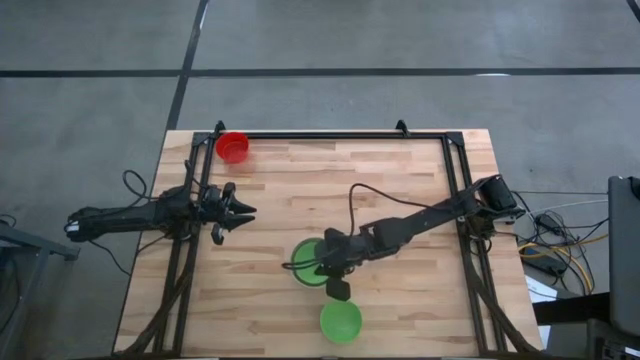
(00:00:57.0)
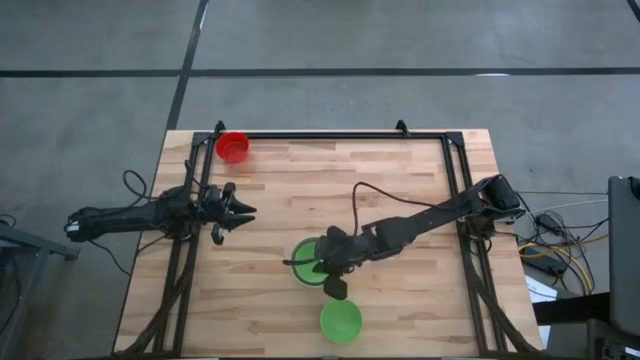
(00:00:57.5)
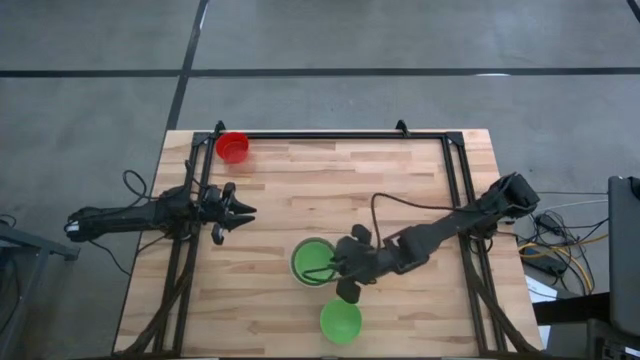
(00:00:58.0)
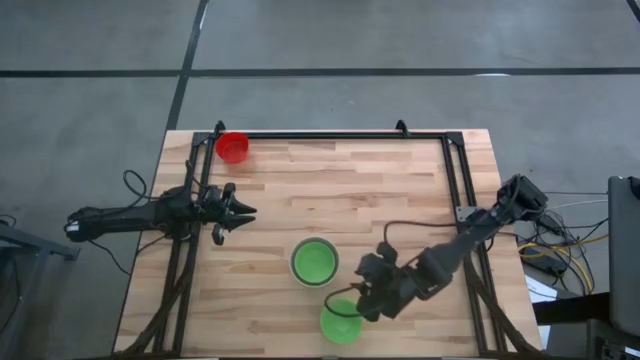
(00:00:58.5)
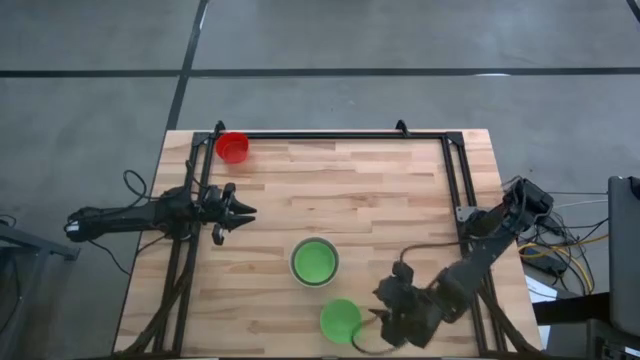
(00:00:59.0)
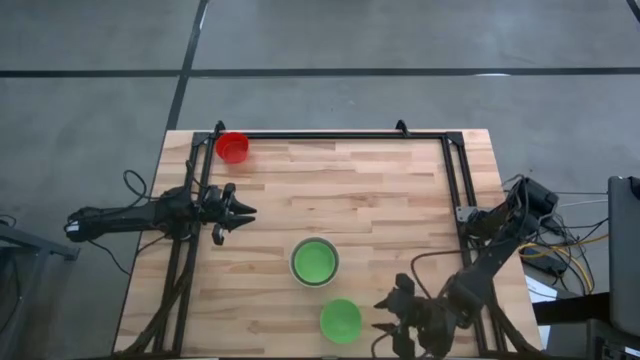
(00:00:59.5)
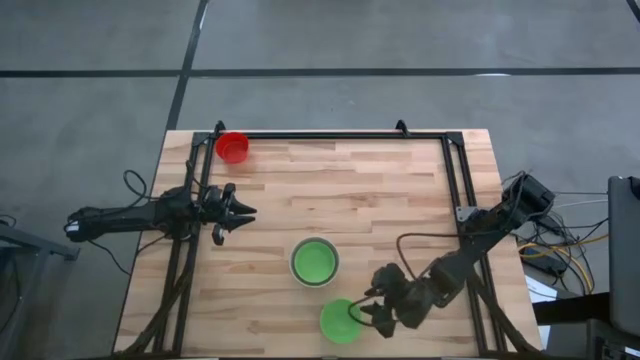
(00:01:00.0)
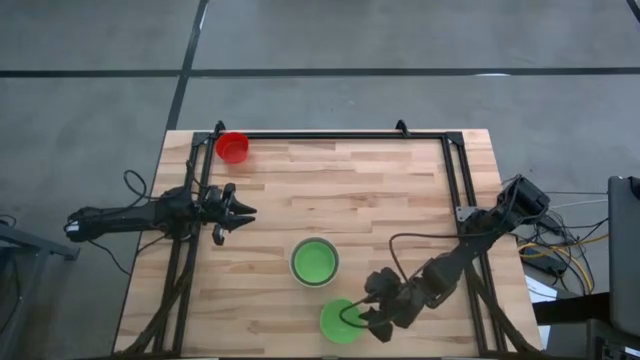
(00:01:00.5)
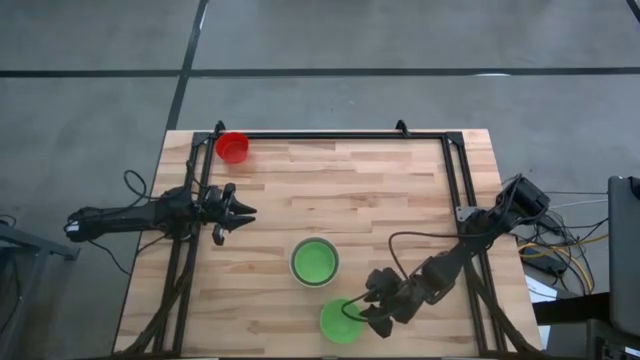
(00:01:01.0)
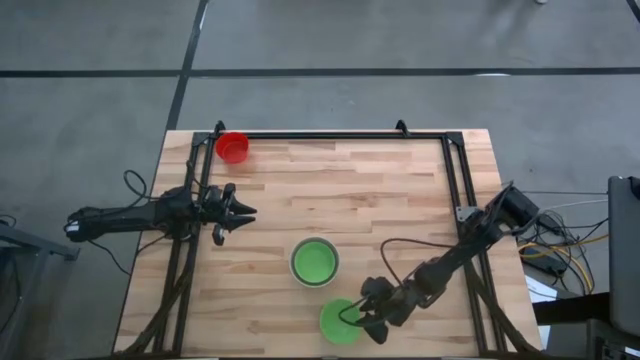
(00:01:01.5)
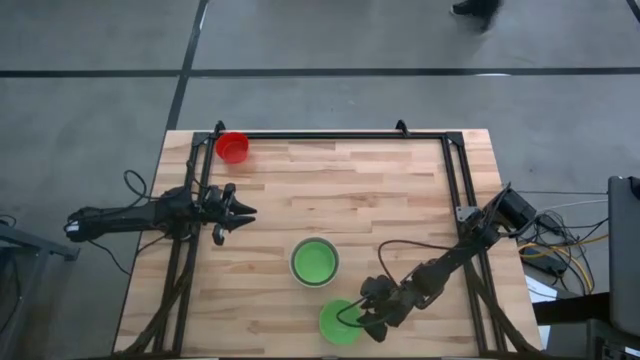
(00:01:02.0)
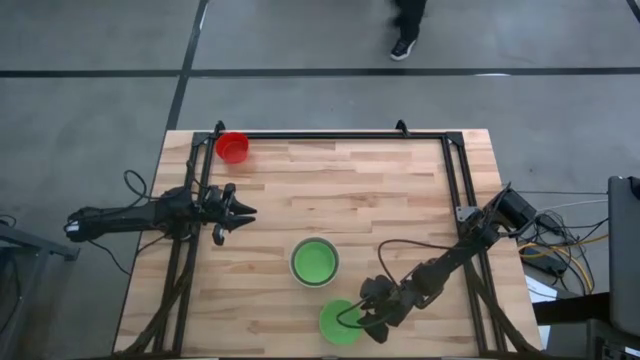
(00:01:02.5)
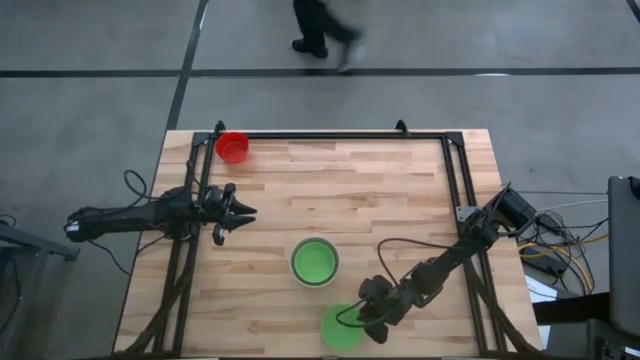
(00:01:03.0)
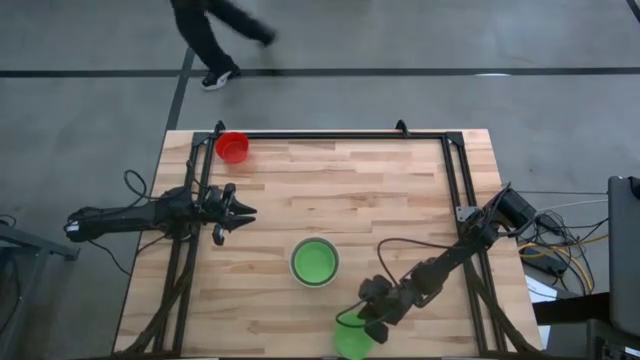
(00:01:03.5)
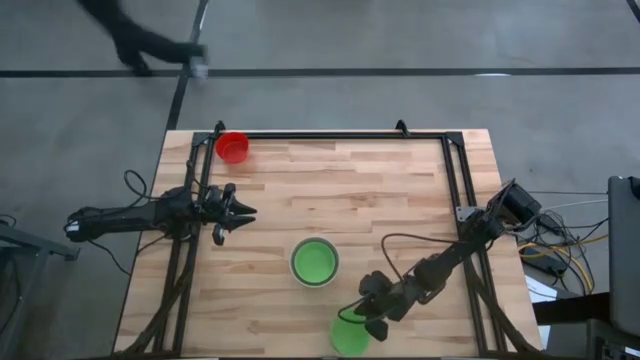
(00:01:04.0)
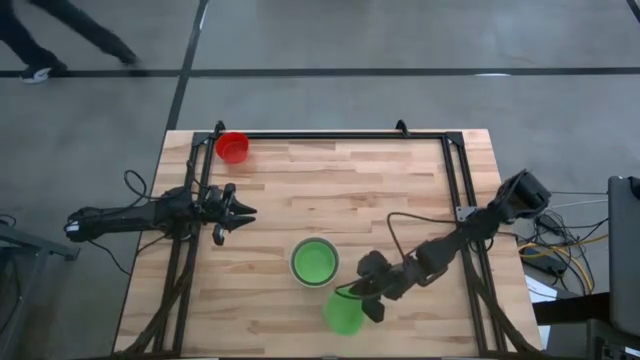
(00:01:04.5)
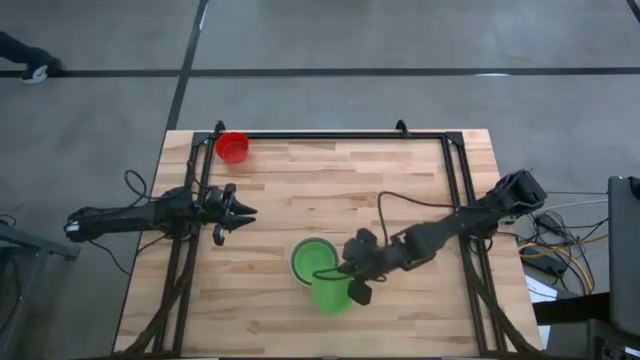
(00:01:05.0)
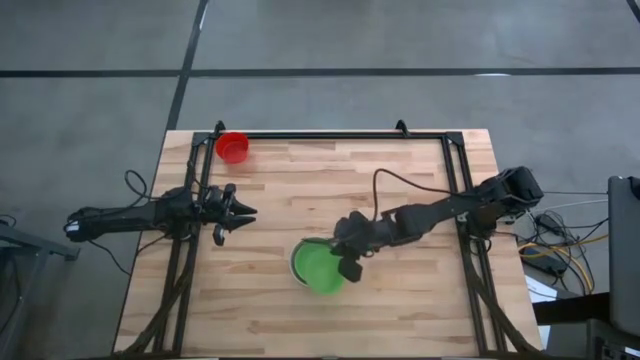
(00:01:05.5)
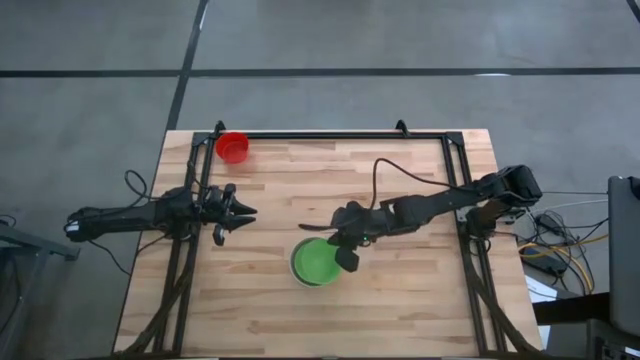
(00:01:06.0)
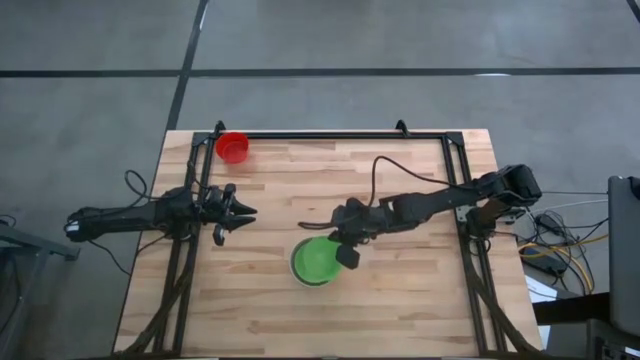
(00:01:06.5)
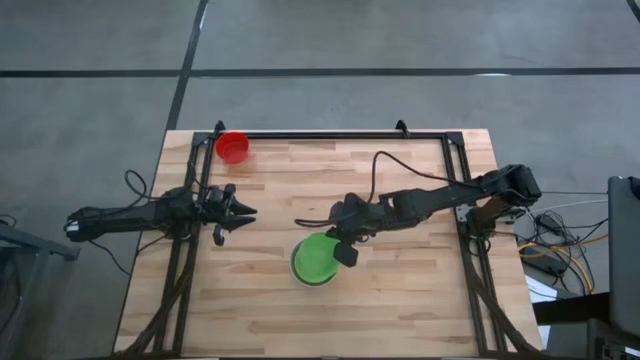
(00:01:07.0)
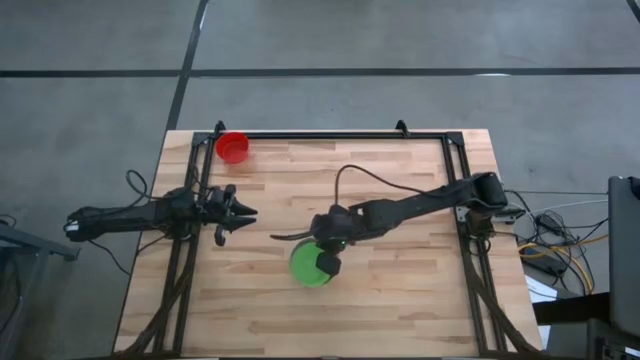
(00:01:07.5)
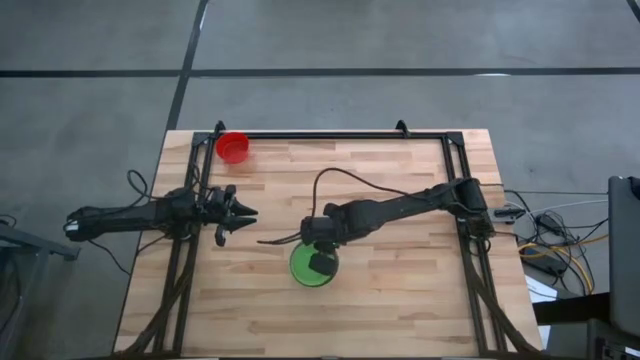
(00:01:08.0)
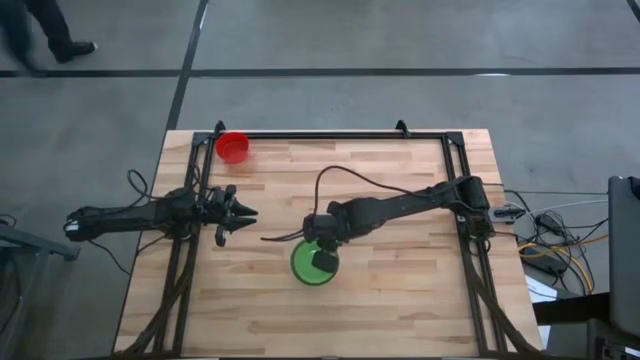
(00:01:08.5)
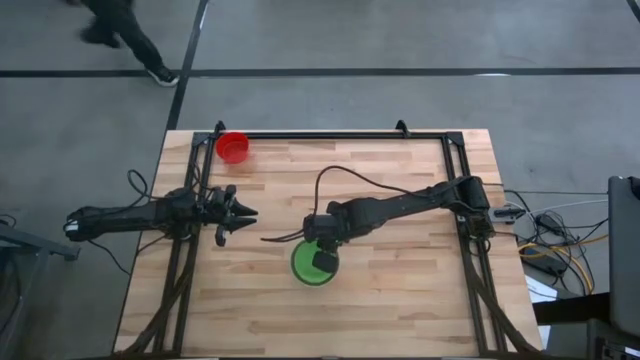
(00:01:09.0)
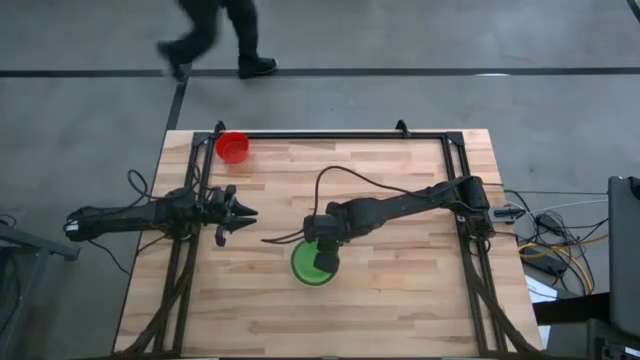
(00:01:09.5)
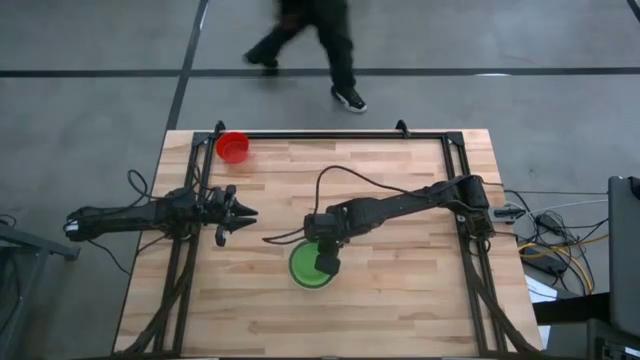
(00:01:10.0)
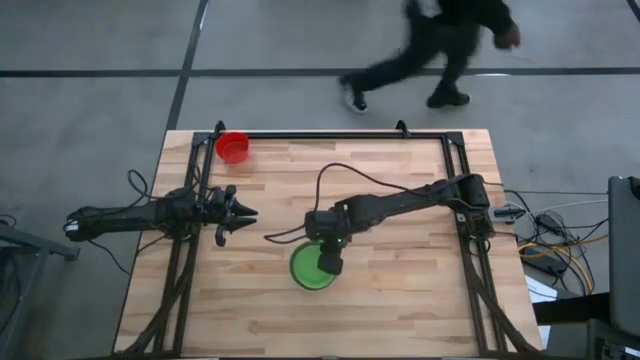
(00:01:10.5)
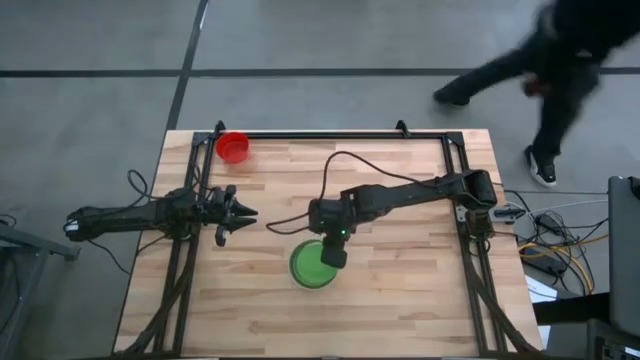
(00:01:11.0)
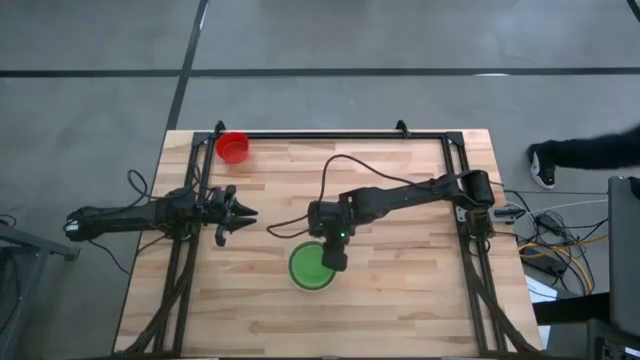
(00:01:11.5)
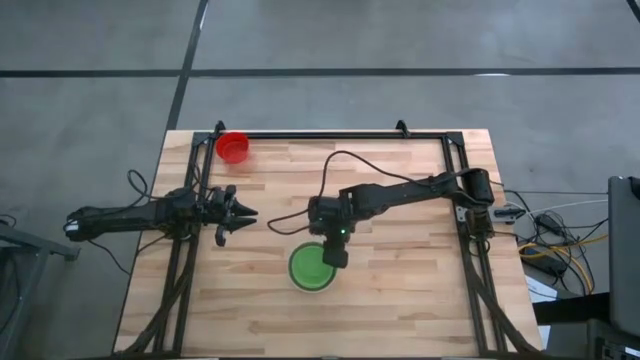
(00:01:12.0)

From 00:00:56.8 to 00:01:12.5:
Stack the green bowl on the green bowl
